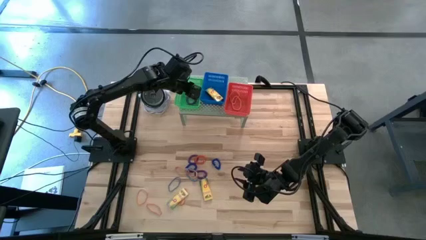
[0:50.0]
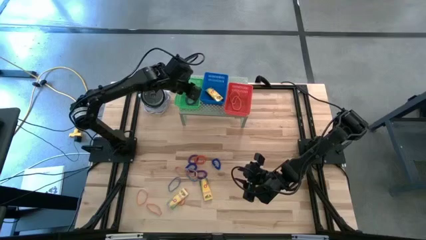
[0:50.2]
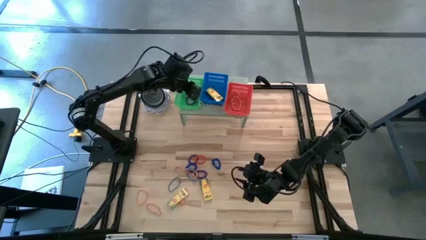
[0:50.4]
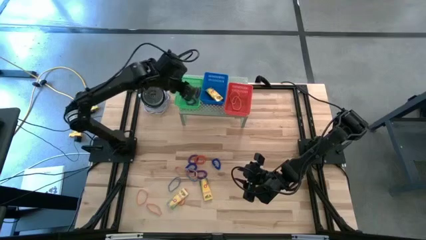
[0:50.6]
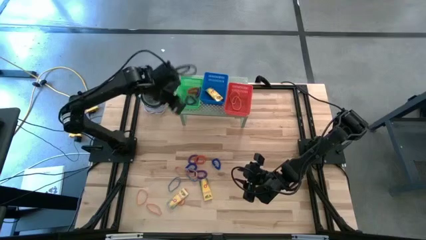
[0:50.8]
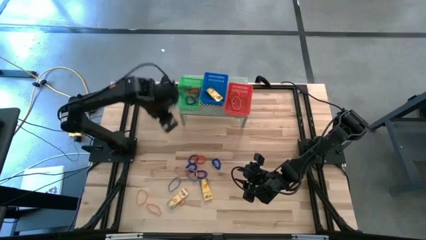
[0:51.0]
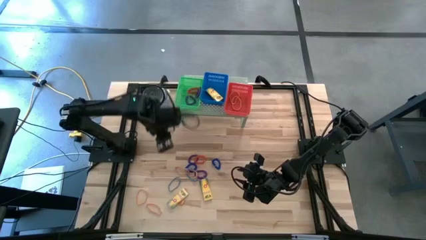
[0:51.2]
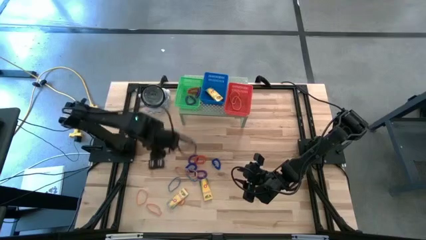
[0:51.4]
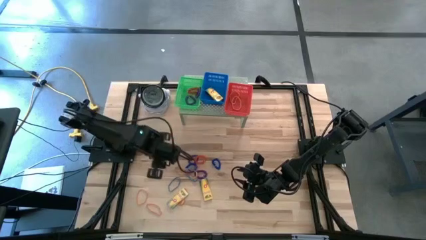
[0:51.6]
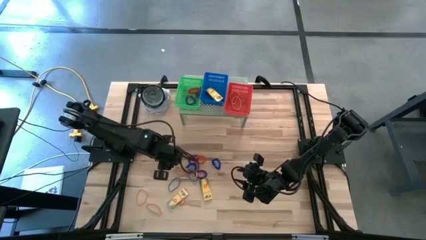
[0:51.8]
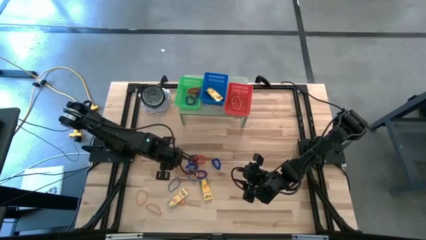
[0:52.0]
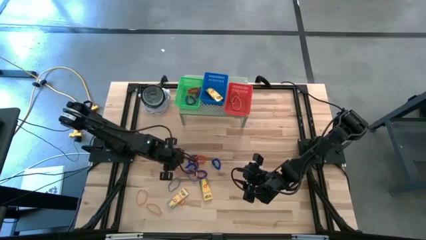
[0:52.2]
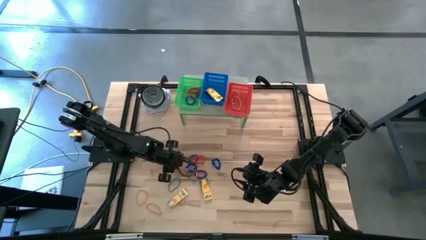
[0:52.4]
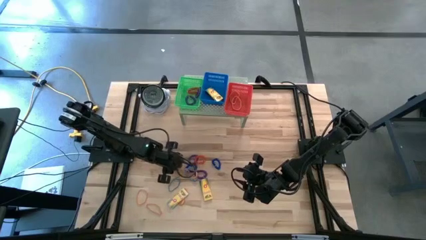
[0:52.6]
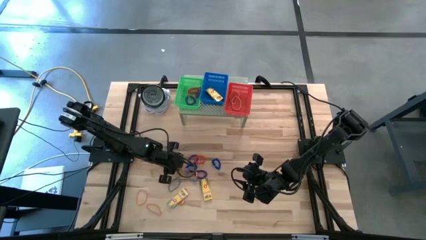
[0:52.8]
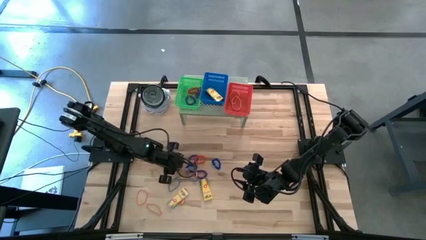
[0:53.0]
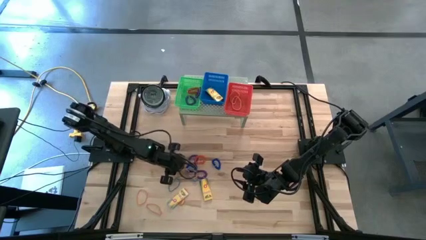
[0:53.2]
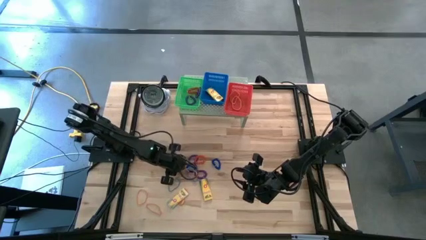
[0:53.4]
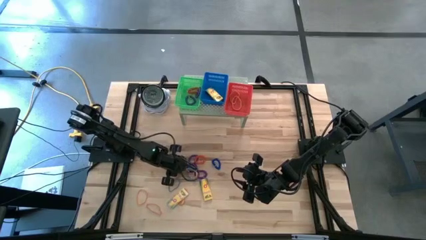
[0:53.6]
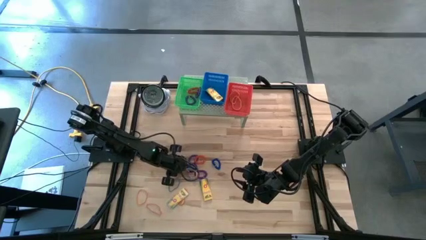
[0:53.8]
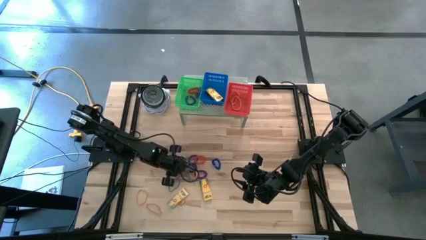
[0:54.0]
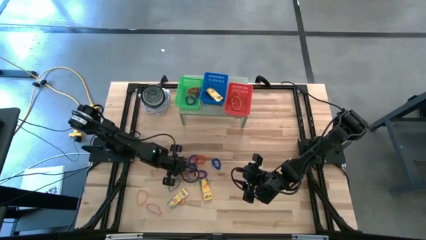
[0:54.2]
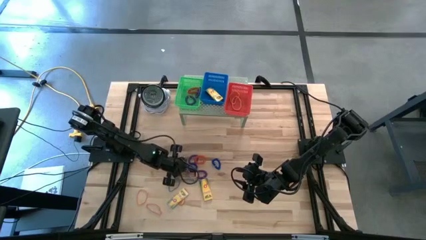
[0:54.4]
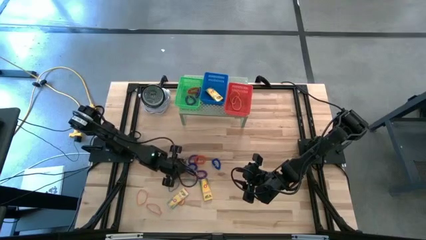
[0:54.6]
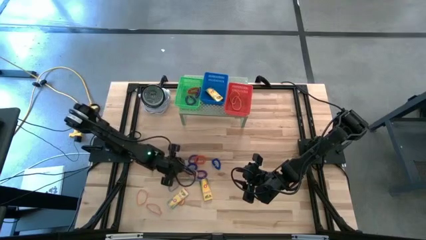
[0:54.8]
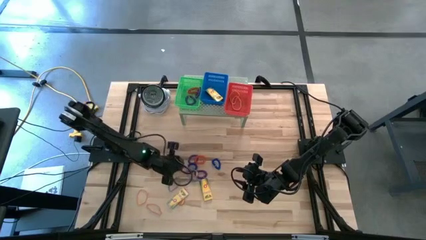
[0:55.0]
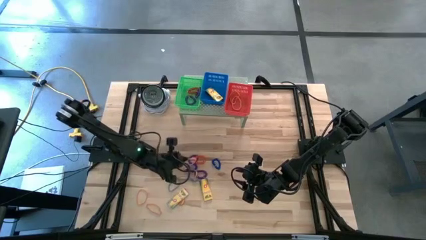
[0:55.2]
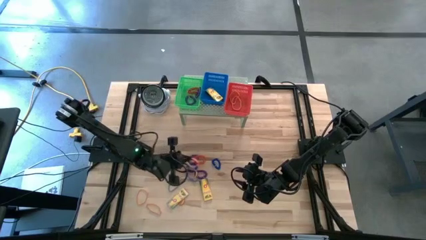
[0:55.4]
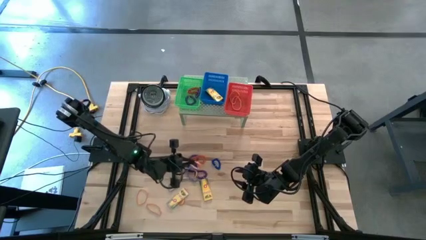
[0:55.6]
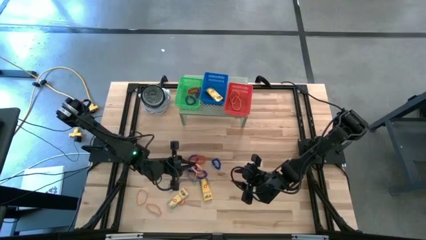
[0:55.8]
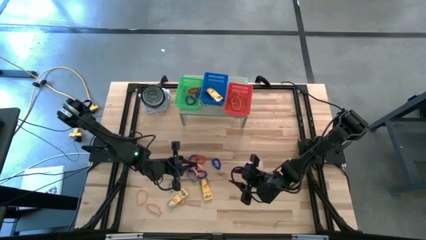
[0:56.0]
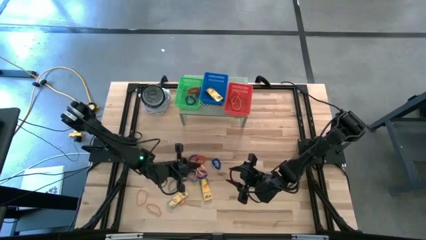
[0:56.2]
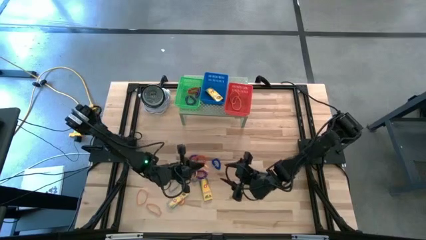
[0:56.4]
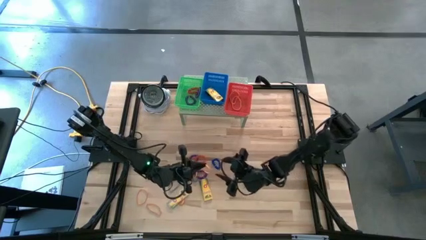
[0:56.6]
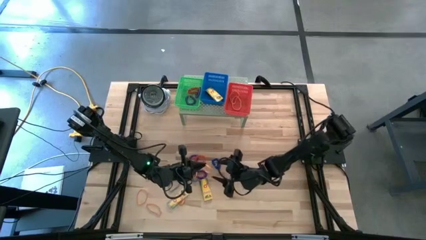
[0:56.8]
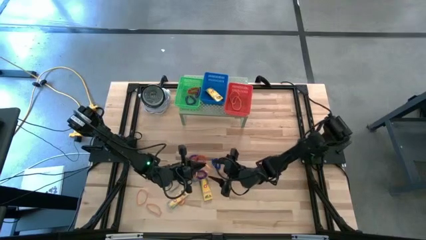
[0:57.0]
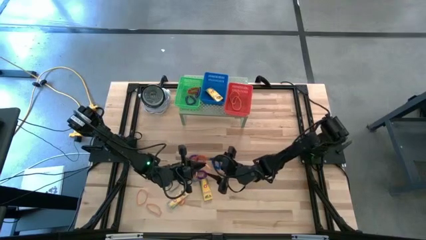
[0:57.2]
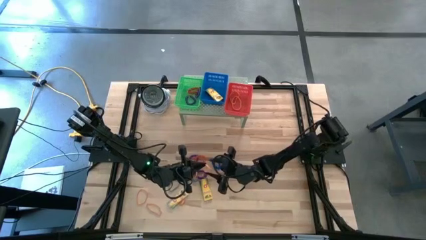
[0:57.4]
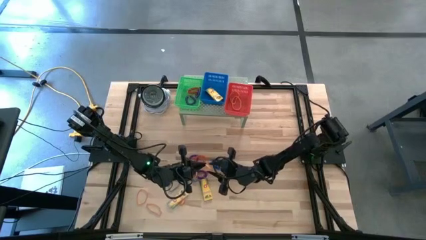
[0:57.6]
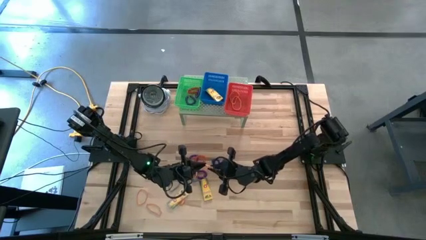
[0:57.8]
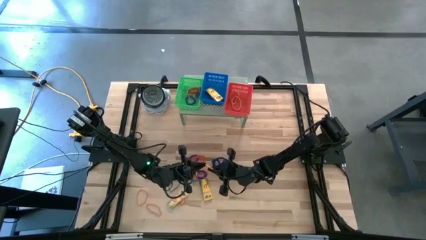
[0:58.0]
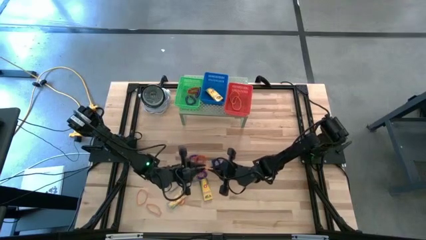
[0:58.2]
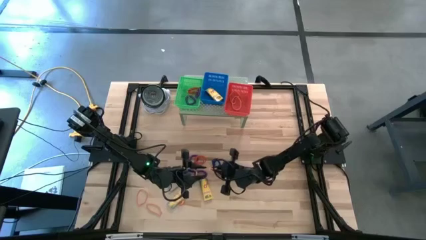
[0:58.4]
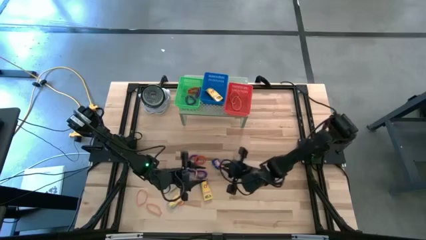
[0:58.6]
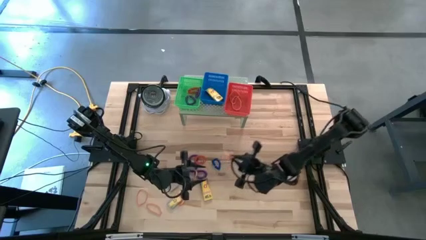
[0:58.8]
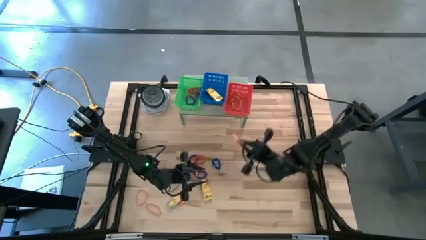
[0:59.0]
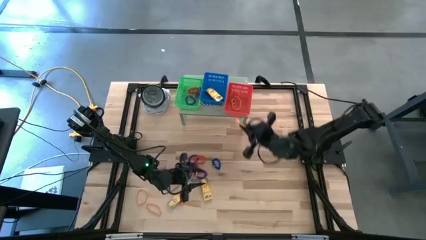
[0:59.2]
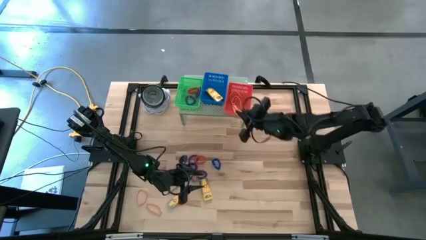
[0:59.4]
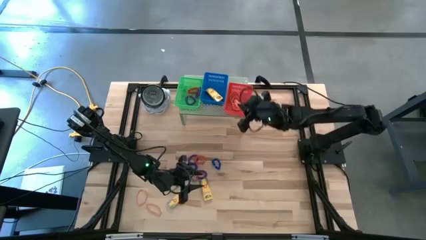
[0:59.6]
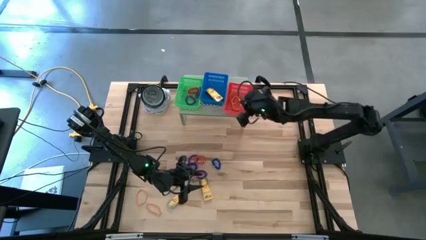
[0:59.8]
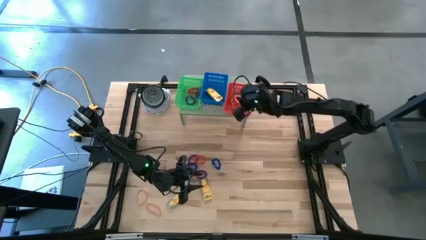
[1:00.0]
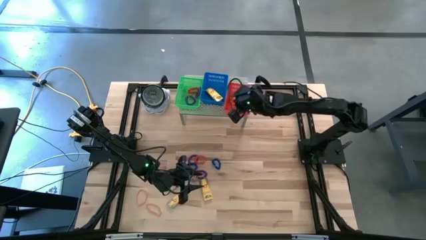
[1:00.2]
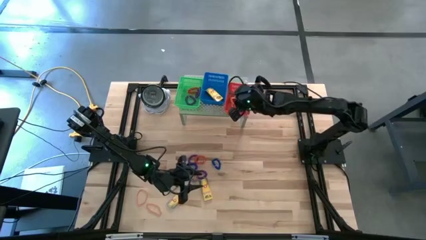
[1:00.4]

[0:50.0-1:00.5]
Task: Pick & Place Office Desk Supplies
Put the orange rubber band into the red bin on the shelf

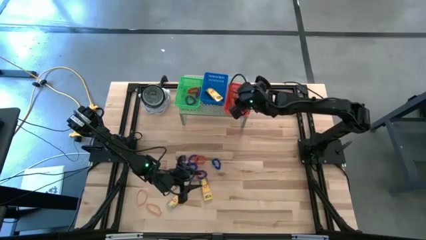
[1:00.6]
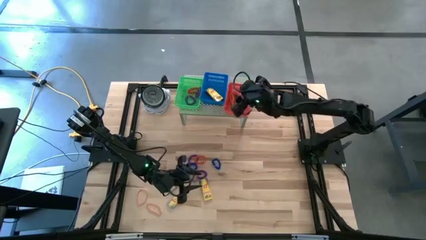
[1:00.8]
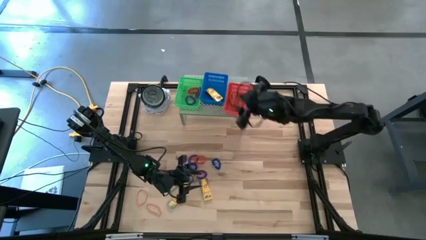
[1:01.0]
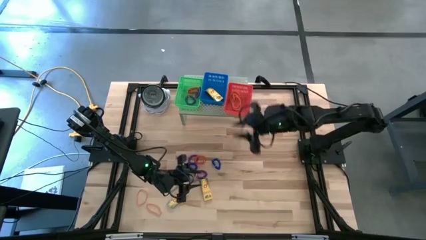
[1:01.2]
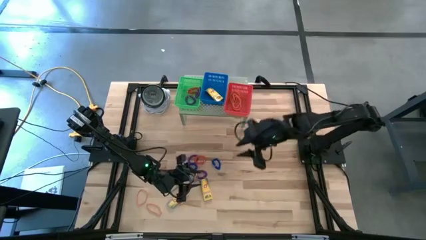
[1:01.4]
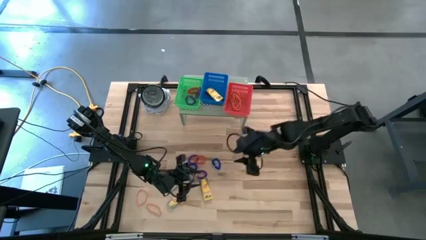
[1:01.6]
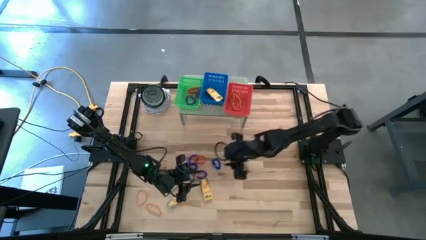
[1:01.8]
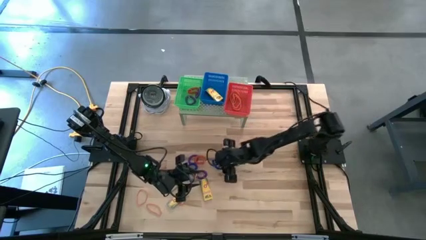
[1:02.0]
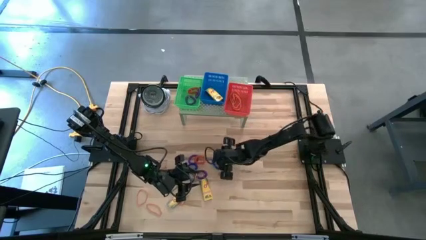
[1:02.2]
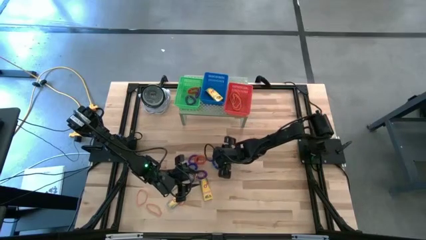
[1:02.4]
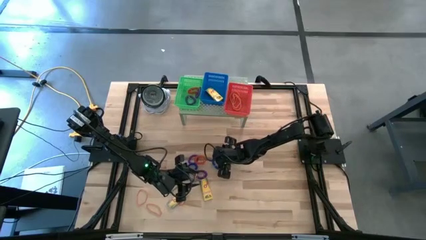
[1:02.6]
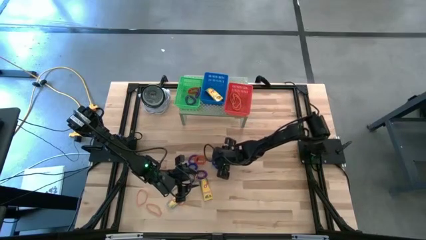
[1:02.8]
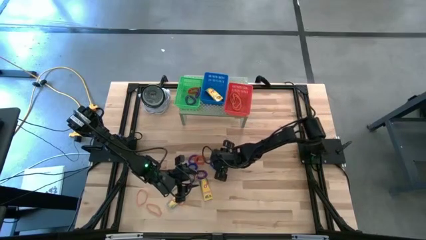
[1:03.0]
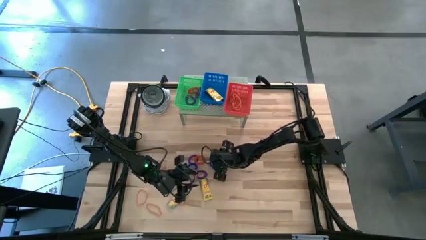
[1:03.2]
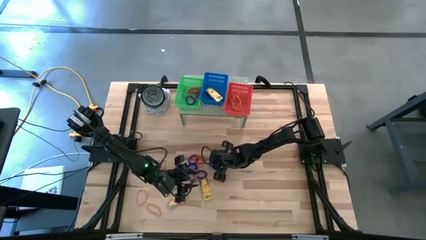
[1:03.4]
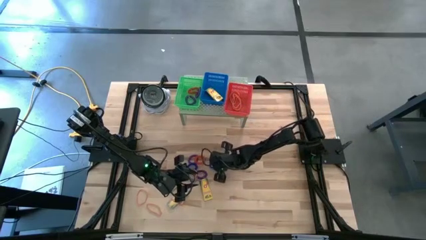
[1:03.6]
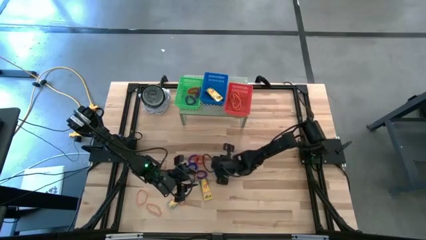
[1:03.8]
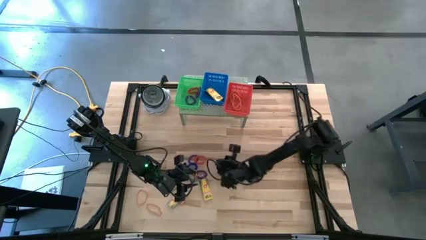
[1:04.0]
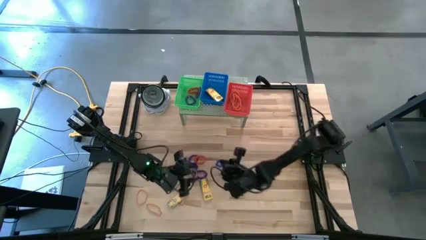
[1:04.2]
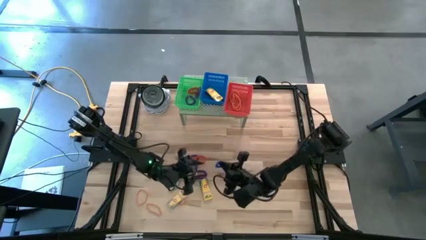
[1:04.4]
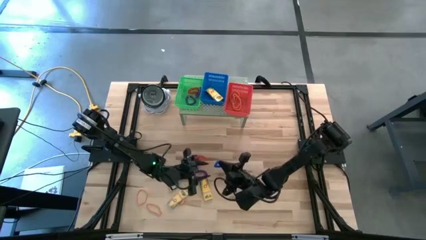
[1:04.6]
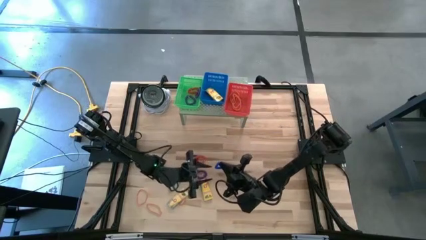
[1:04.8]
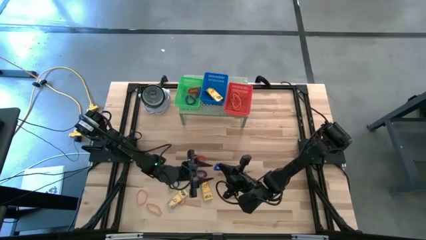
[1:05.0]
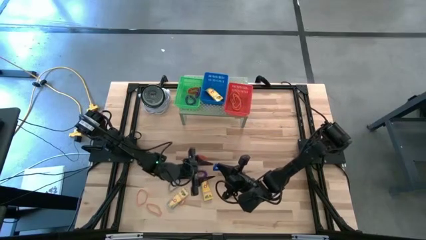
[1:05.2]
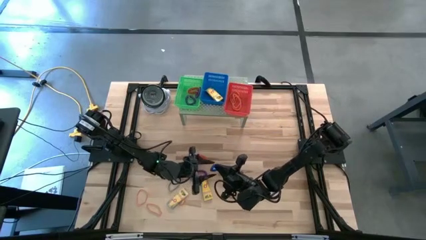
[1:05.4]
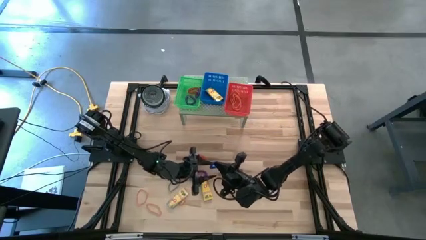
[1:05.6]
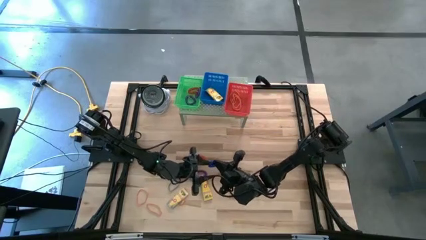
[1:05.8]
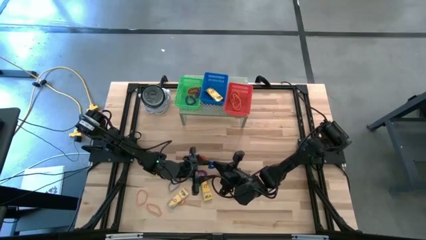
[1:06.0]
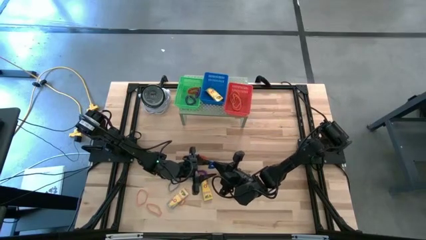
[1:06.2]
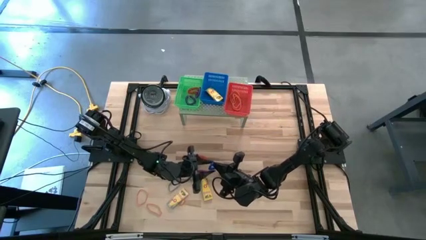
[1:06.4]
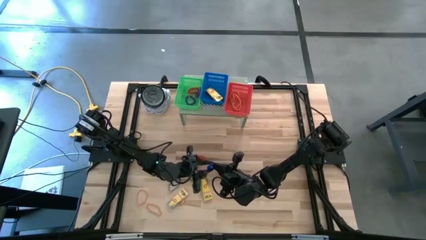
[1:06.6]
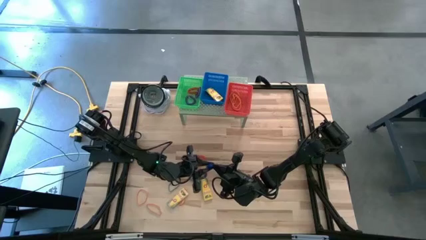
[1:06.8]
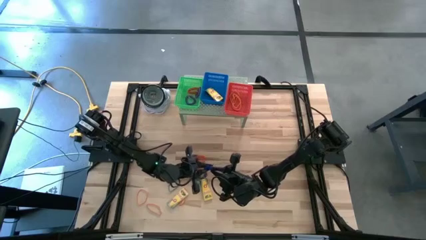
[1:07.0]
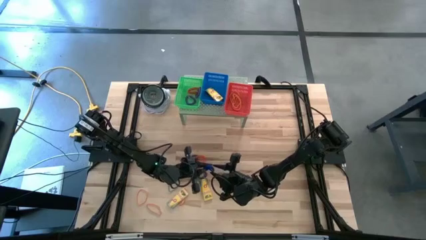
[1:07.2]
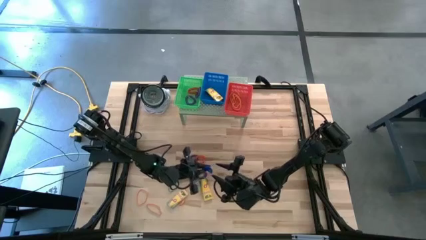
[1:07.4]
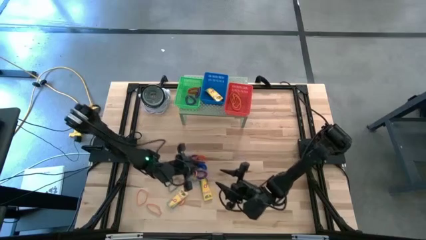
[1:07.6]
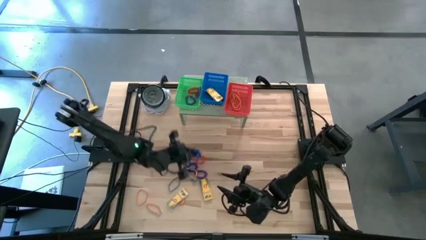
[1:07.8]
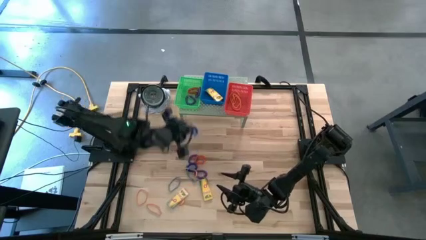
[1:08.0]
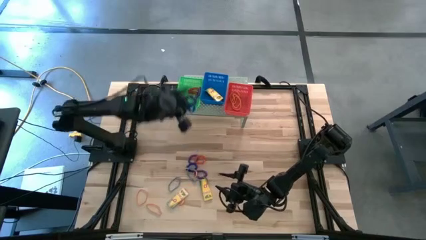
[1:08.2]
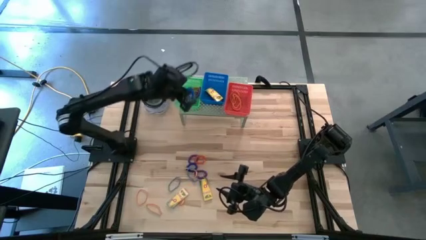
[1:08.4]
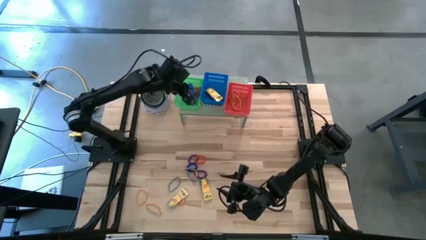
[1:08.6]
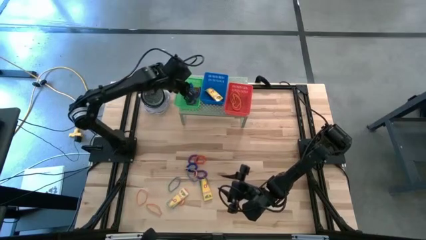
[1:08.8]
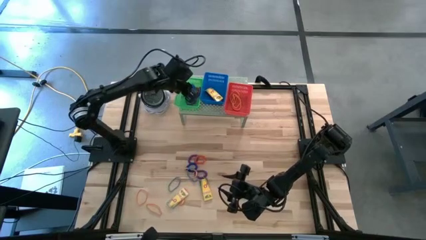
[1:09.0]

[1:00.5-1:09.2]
Put the blue spring keychain into the green bin on the shelf
